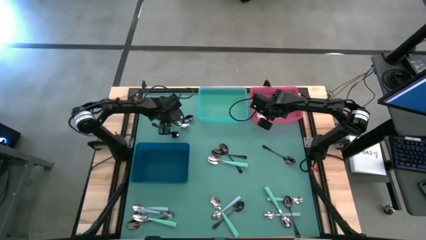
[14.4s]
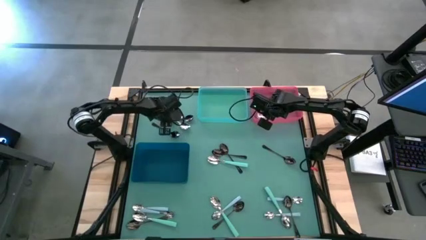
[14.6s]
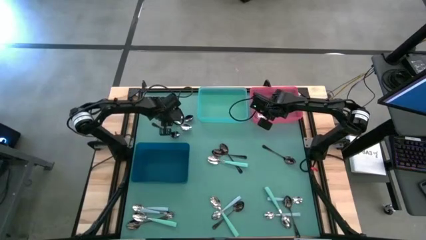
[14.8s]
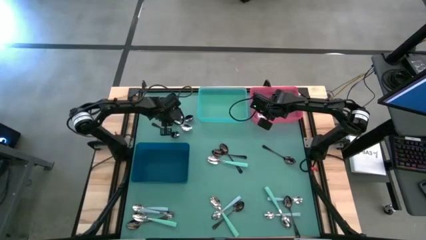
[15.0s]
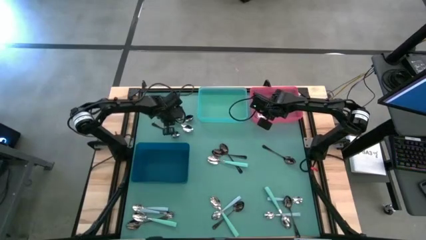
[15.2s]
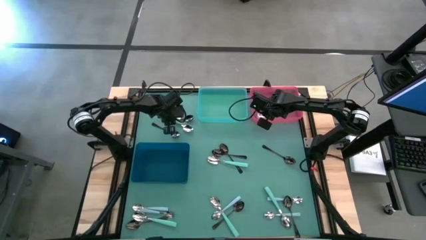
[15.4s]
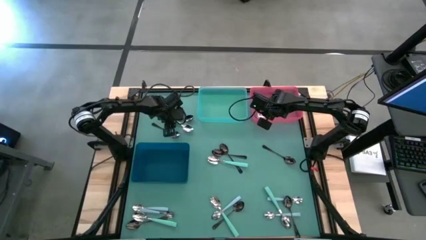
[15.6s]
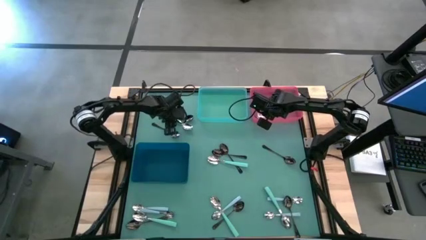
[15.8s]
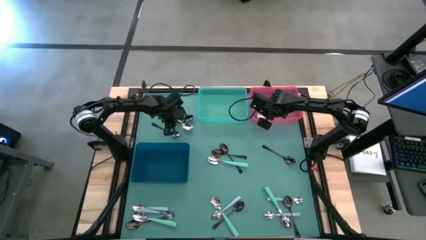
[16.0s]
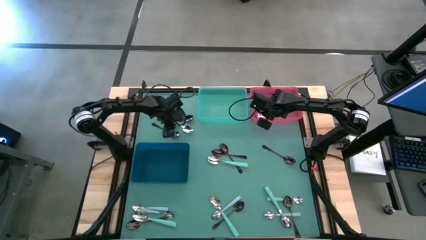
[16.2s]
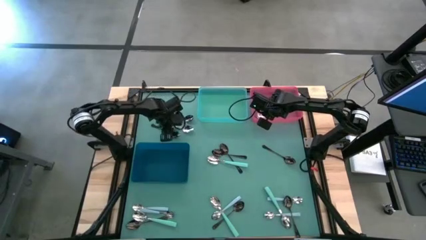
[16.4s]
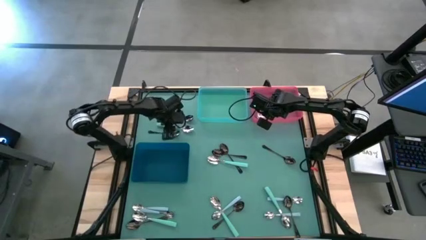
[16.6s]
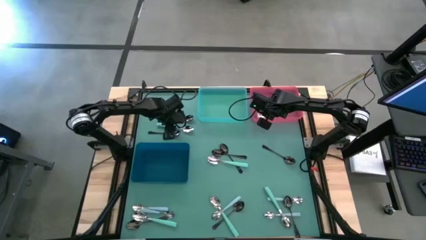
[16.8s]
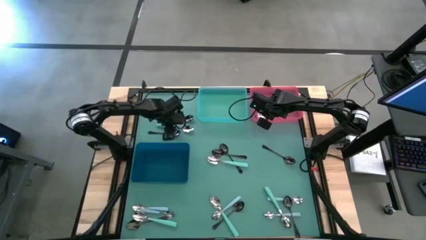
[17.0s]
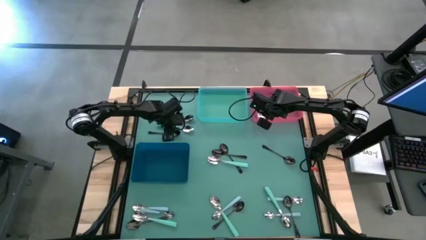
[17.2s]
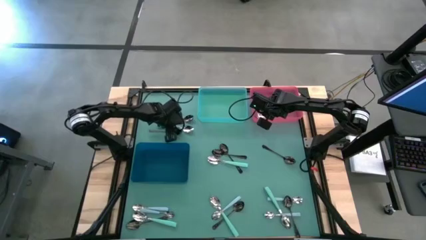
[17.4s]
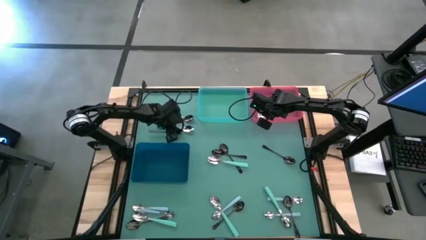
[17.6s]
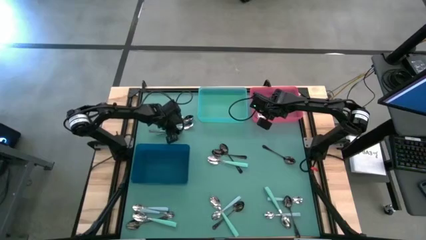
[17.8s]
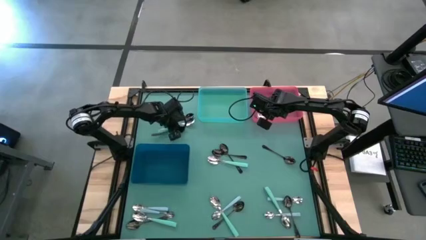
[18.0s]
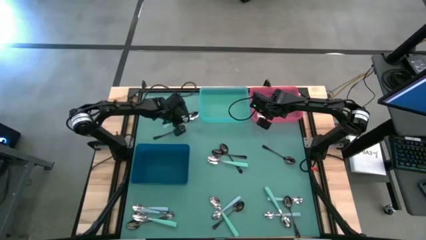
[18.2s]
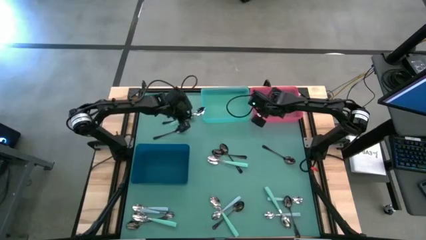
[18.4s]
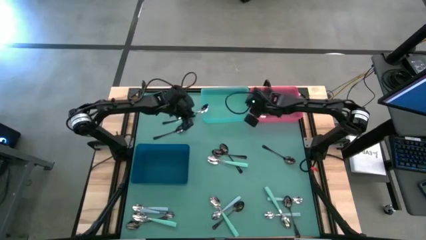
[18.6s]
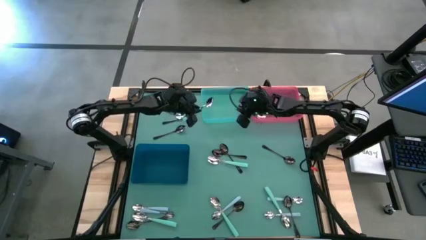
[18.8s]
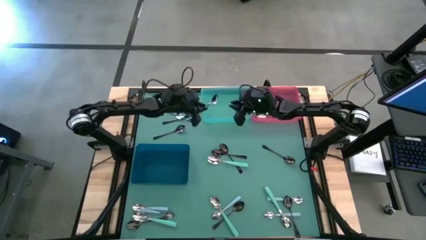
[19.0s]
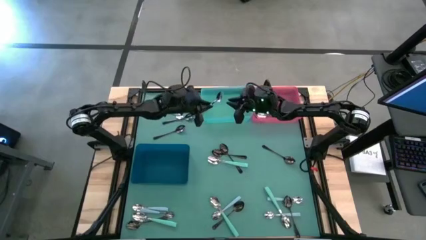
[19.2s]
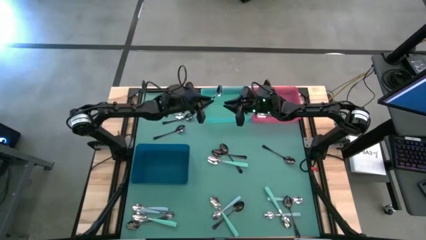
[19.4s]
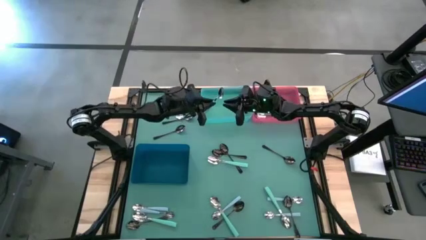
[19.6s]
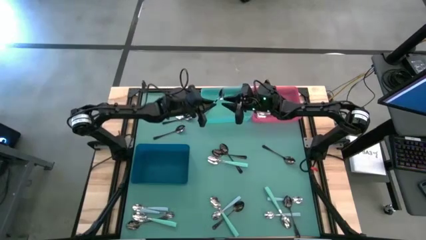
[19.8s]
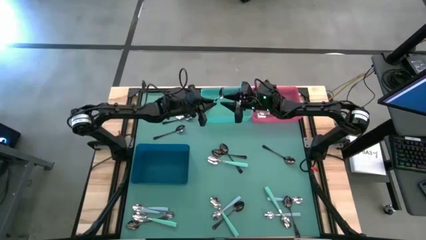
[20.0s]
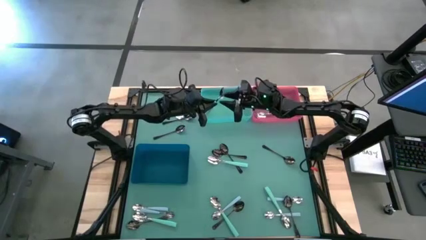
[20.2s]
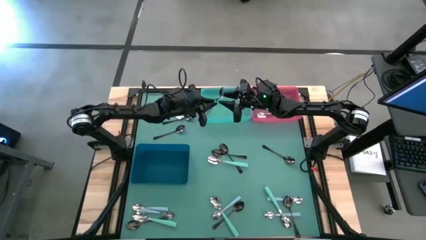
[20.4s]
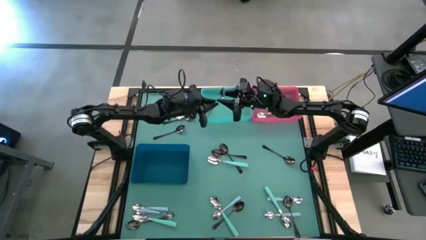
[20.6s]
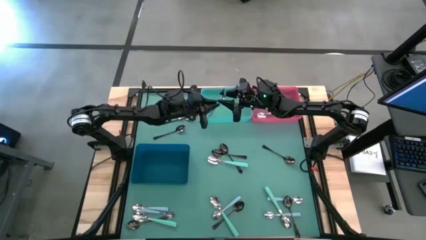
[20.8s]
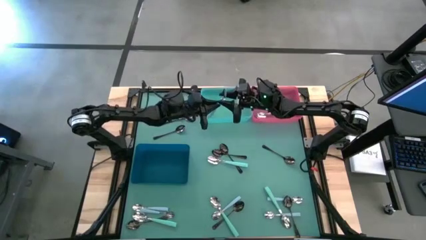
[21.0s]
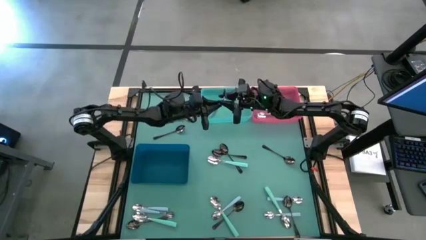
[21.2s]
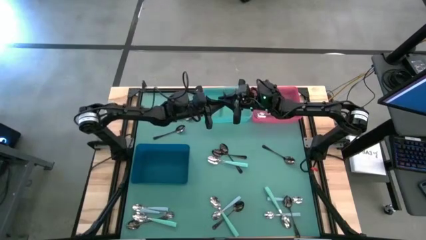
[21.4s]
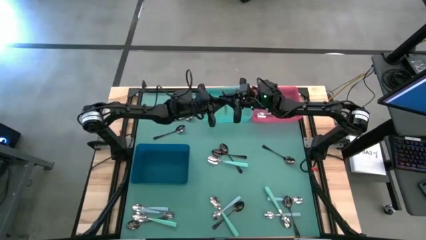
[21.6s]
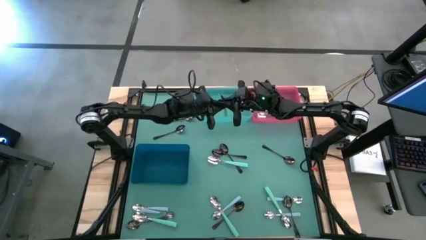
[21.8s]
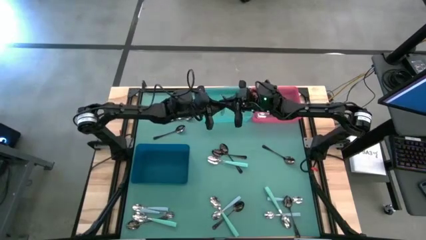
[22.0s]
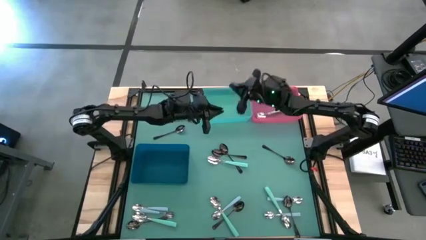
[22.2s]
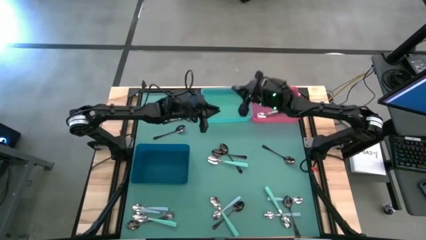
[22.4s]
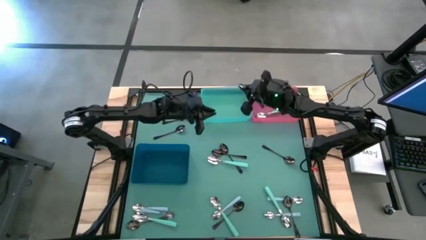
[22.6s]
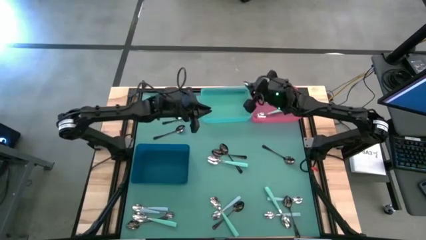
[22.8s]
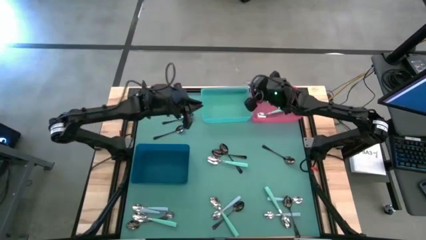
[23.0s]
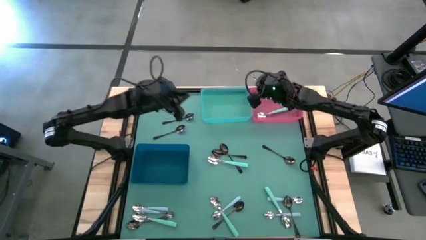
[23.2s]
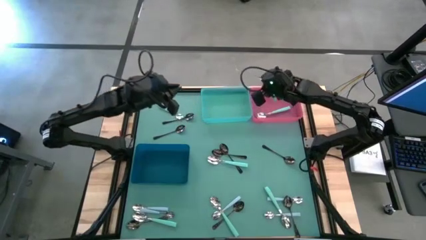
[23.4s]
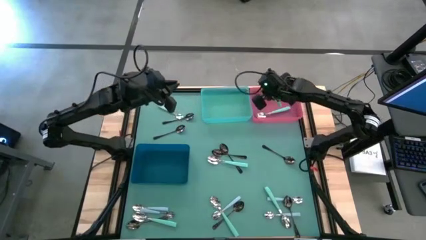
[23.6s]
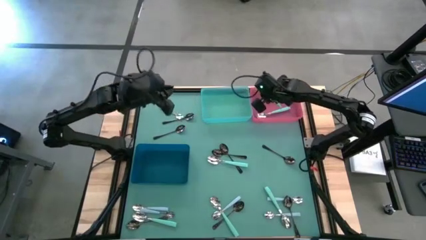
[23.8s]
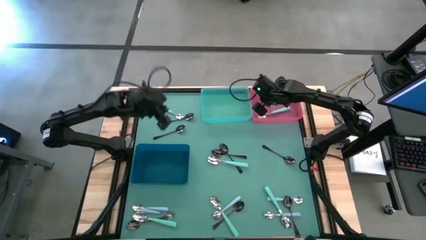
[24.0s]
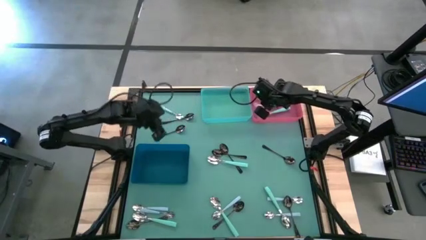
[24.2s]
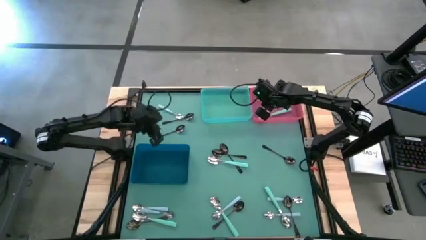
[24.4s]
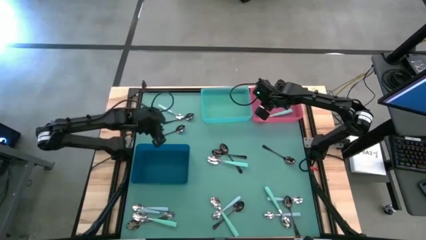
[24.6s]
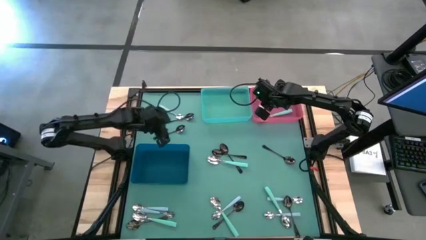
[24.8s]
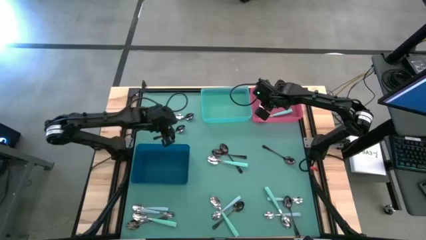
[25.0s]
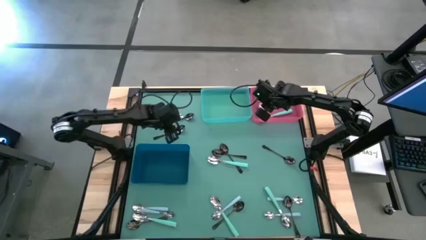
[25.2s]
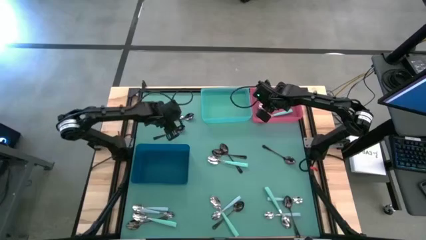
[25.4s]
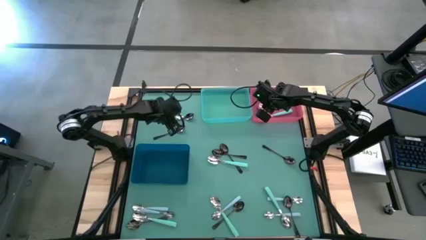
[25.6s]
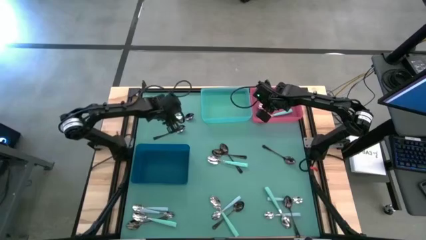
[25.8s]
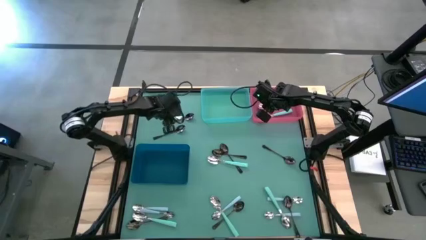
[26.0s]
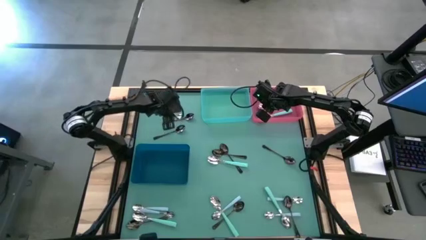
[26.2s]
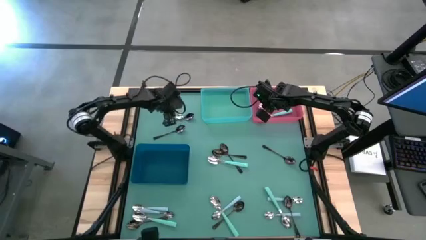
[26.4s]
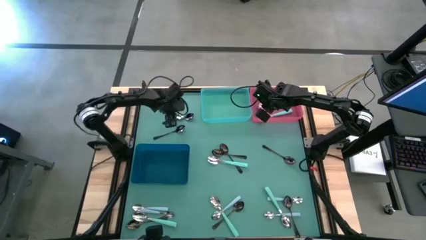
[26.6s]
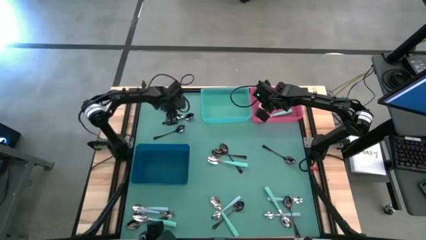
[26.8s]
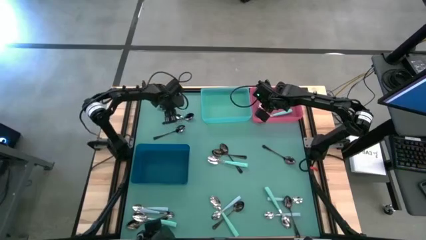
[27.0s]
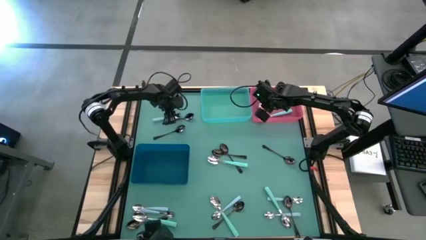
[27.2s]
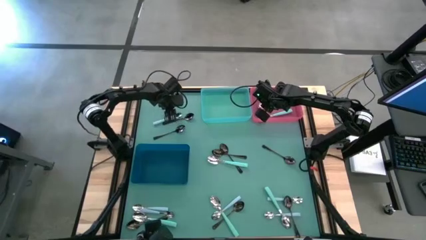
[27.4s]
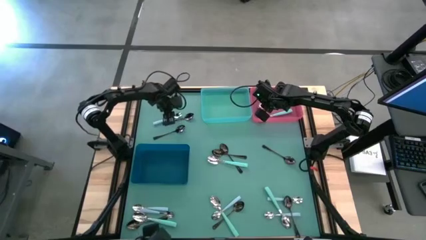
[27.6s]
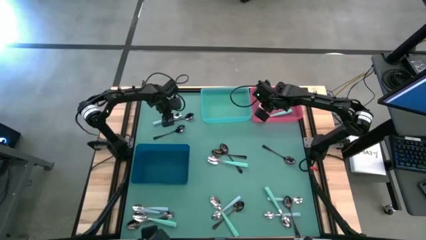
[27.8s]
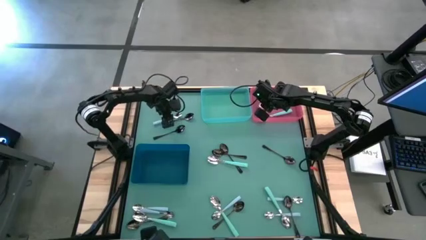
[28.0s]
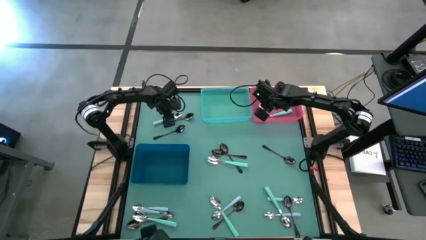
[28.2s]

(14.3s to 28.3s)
Task: Sort silverware by color (type)
Put the top left green spoon into the red bin
